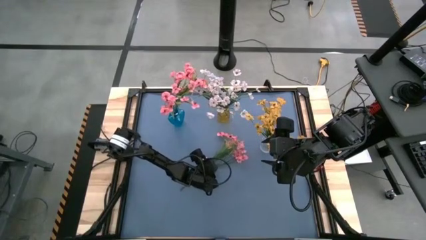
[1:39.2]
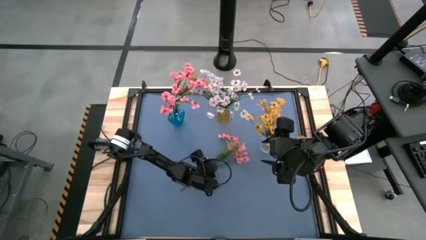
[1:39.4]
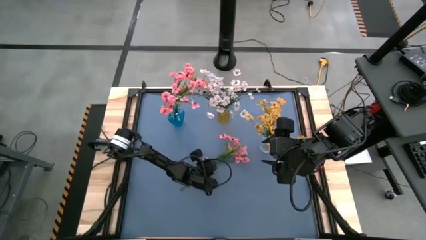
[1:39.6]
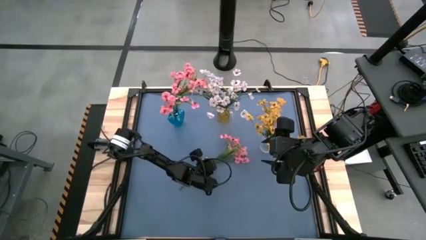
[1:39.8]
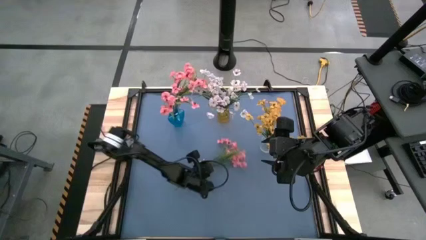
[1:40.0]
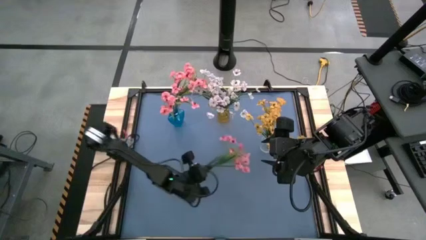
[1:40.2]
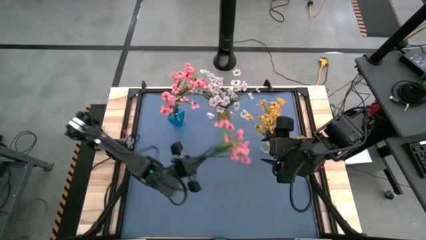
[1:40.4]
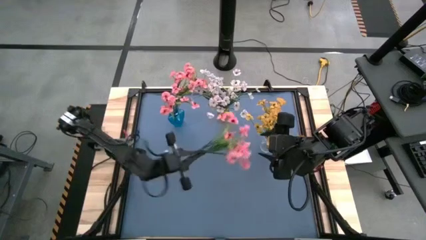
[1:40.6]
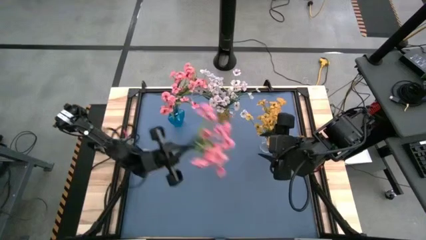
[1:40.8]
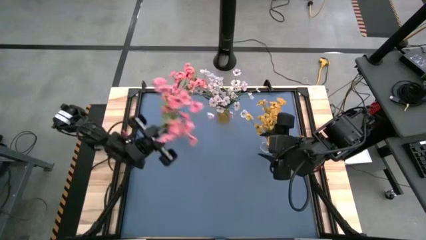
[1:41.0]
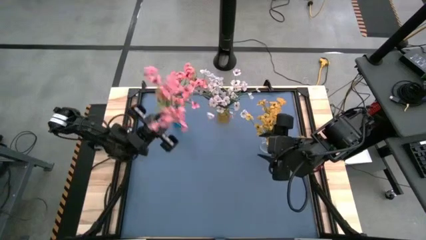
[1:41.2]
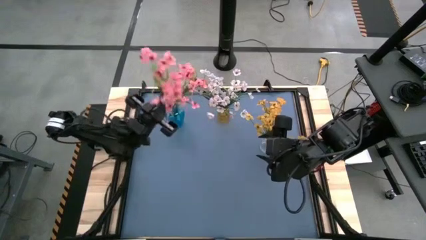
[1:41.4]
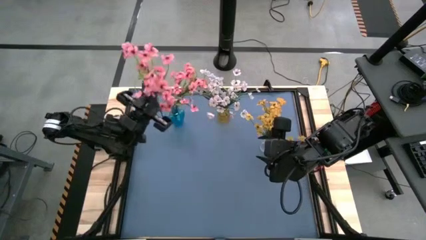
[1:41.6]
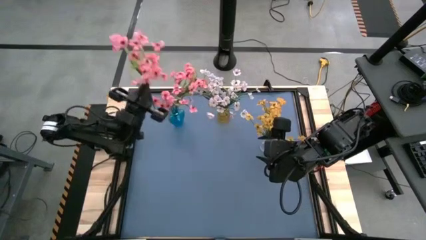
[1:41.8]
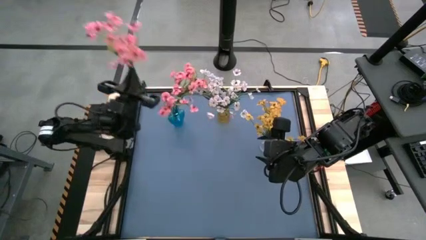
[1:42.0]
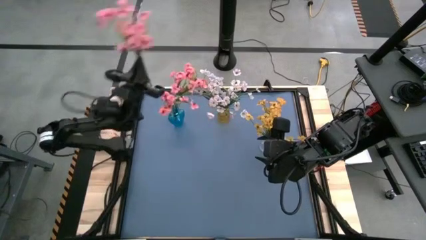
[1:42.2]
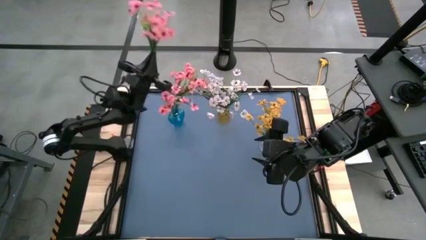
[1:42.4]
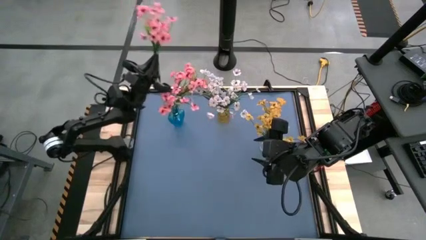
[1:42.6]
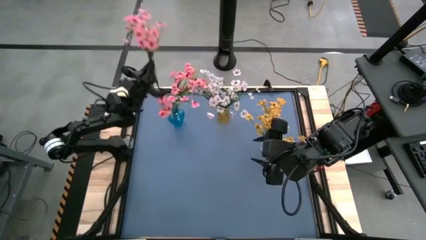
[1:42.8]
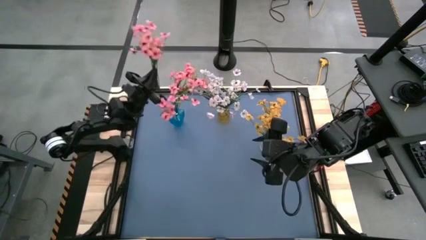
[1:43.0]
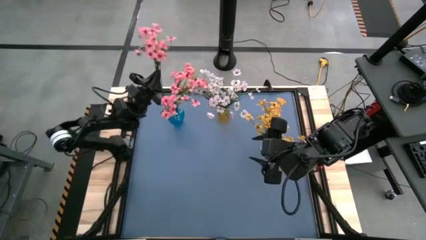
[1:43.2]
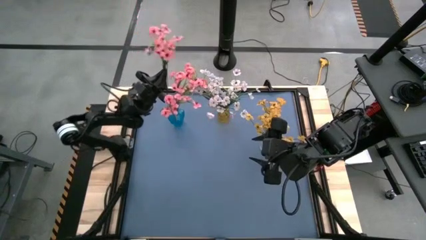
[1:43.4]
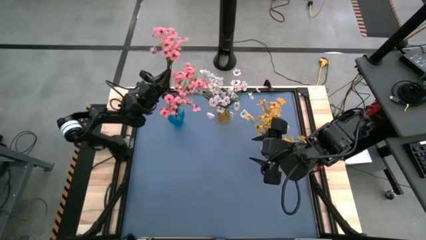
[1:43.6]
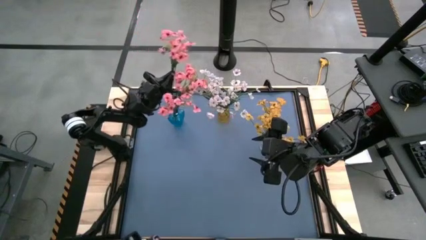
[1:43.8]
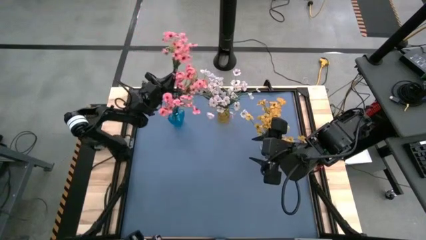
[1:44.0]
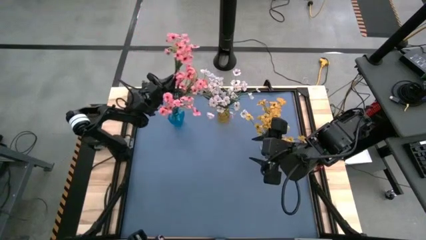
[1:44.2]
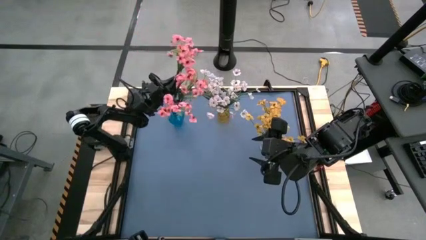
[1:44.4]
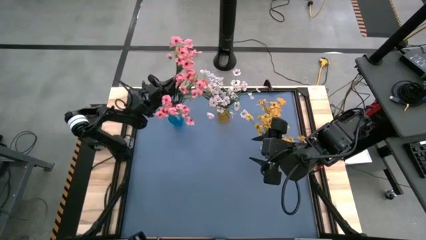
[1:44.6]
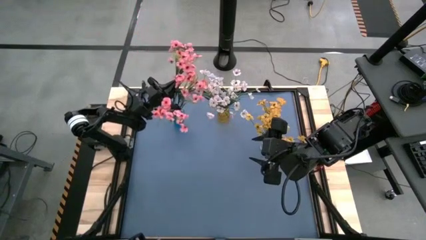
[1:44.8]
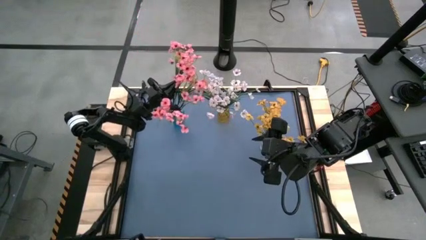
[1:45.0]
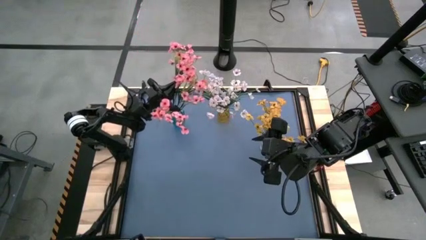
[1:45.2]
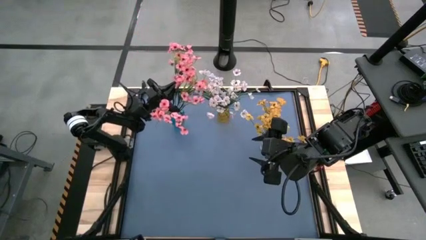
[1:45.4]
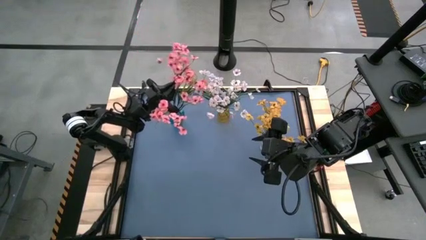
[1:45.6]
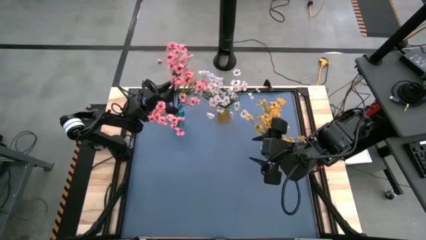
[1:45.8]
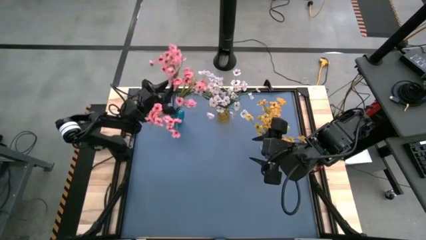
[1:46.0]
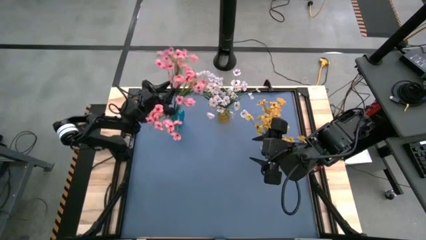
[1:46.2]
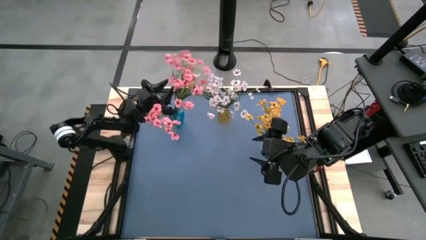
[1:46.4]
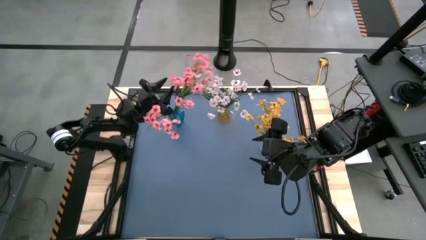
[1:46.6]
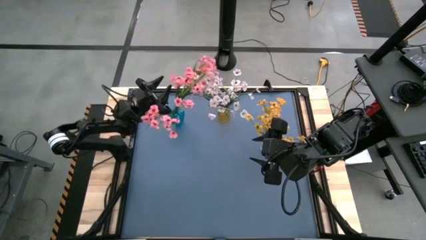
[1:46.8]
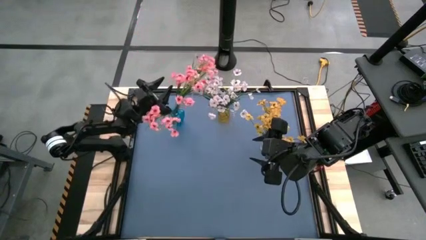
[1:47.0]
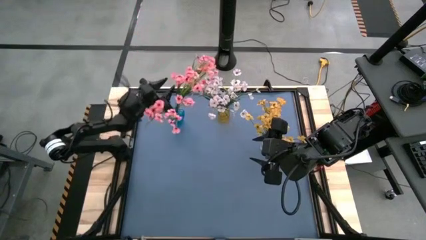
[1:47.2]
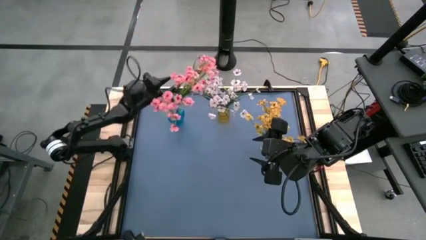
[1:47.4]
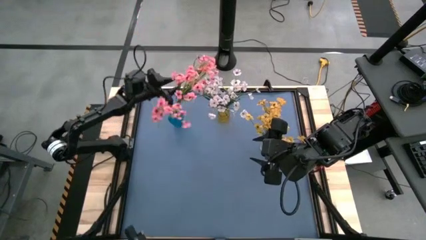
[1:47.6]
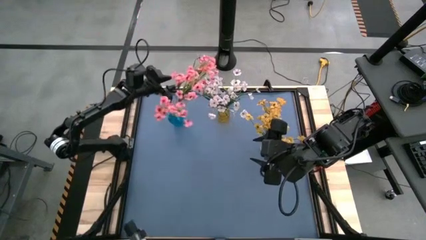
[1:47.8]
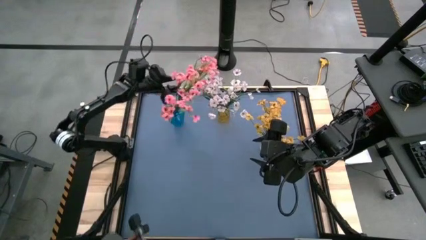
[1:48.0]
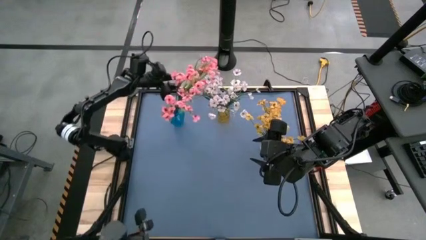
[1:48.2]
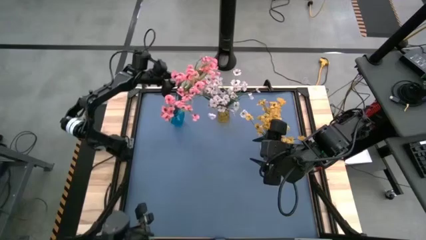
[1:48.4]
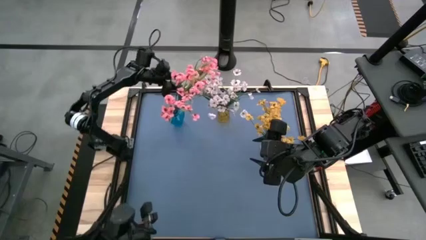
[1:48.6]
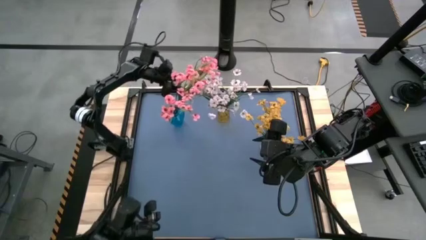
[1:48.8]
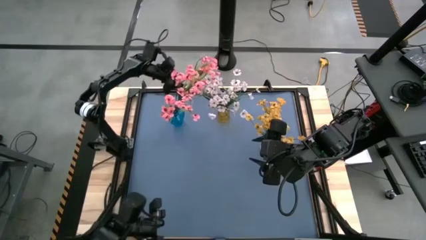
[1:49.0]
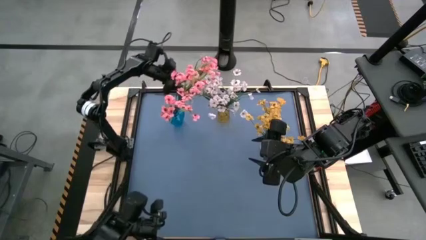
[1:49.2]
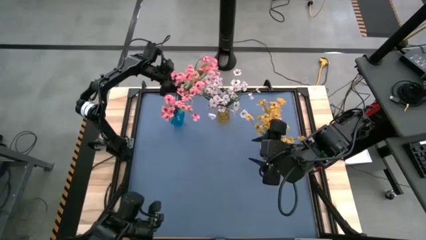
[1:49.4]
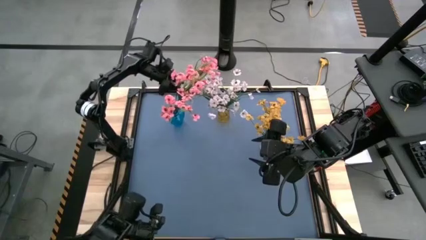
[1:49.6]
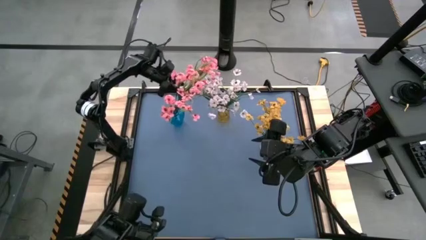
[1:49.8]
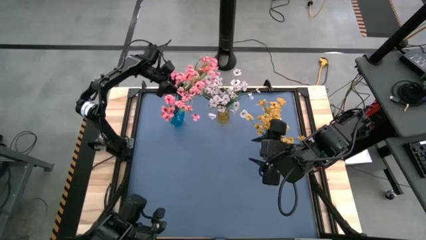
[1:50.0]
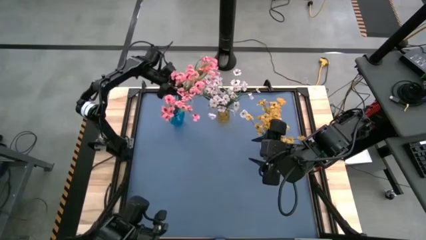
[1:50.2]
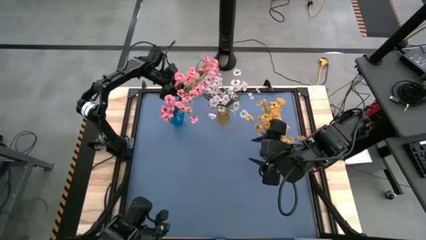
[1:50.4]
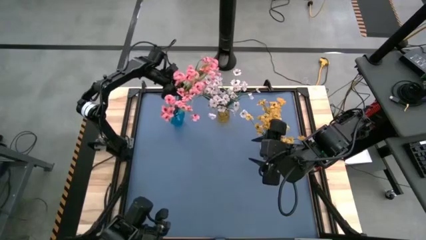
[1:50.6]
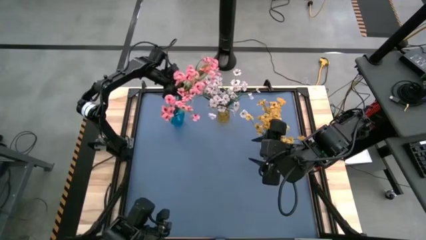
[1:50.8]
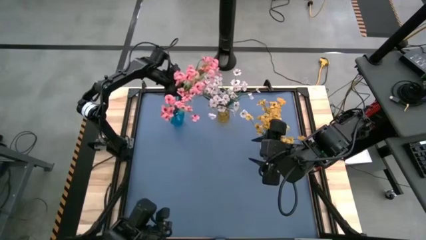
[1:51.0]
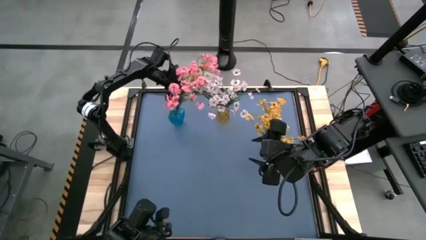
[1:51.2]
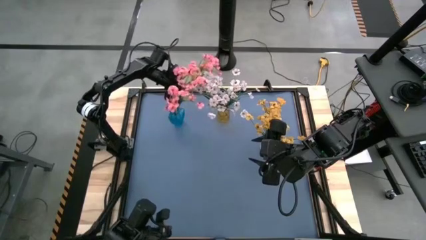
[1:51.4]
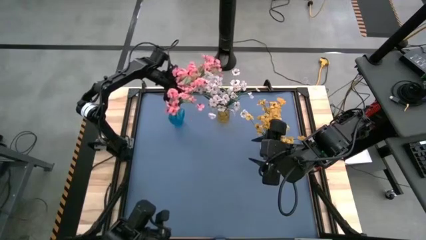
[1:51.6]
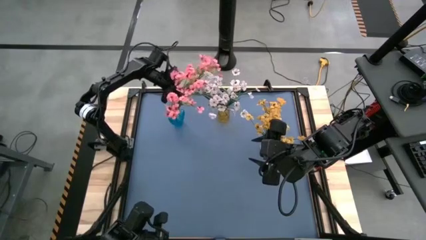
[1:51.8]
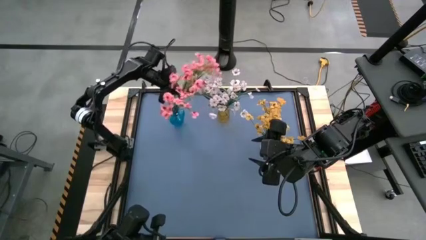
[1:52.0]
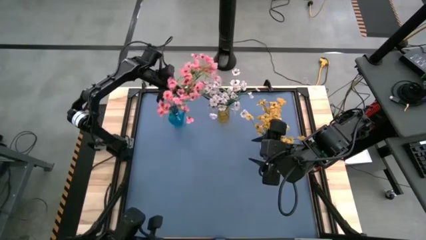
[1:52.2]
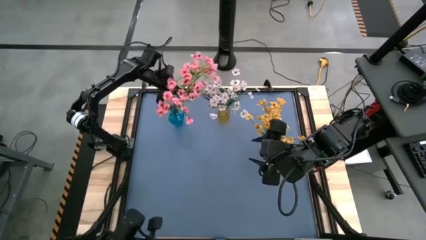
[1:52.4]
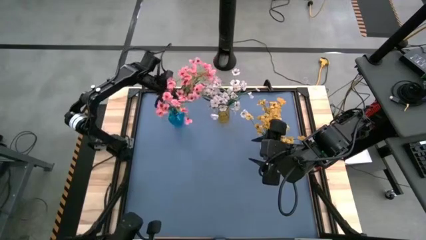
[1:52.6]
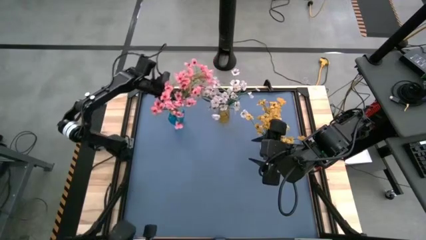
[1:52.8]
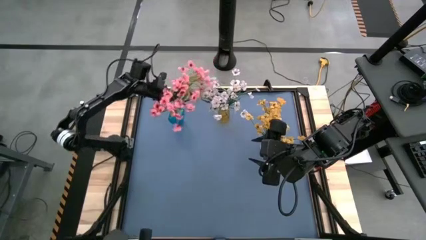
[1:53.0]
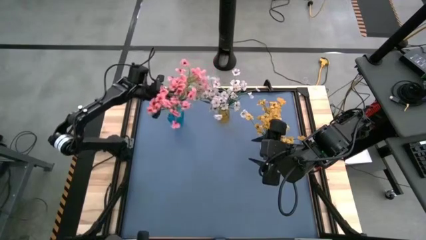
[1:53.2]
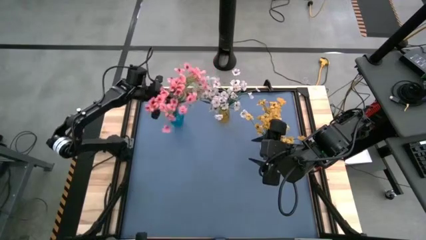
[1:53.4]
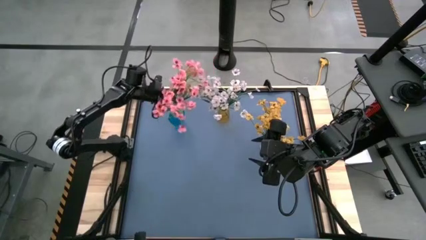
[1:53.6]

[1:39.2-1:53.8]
Task: Sort flowers into vase by color
Put the pink flowers into the blue vase
